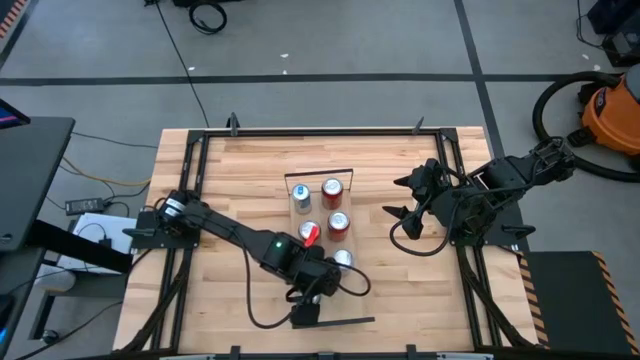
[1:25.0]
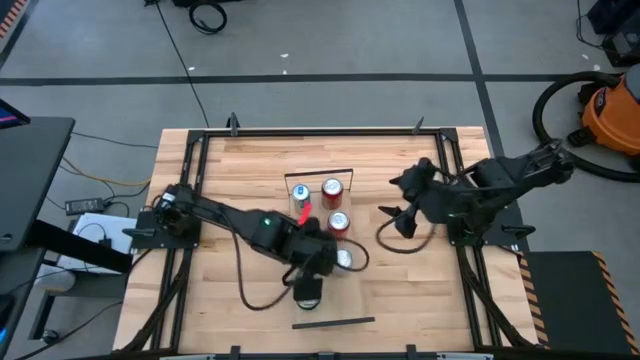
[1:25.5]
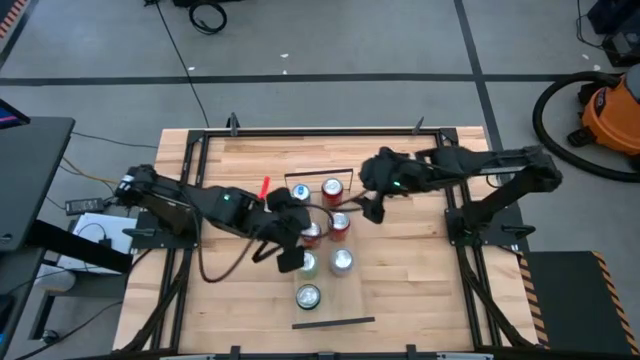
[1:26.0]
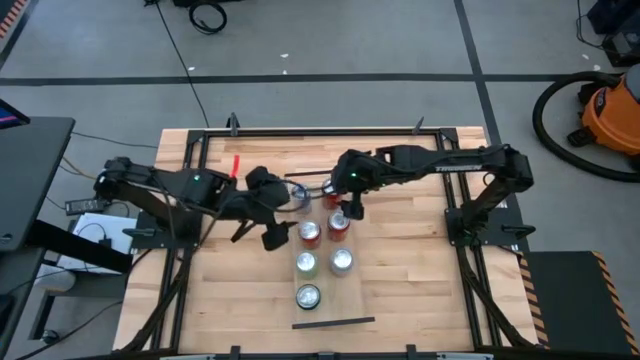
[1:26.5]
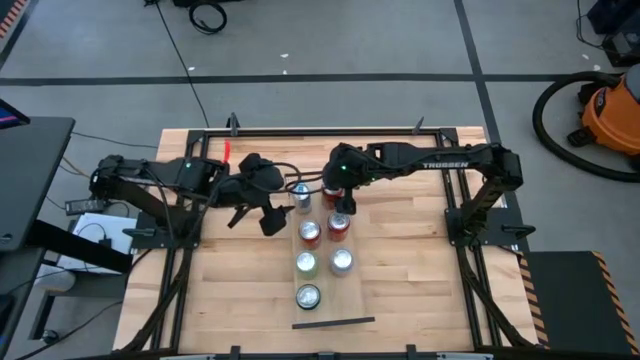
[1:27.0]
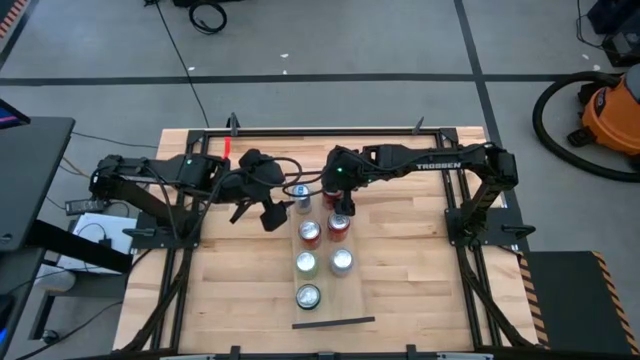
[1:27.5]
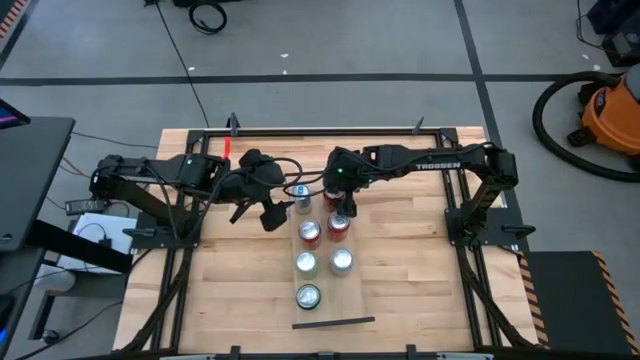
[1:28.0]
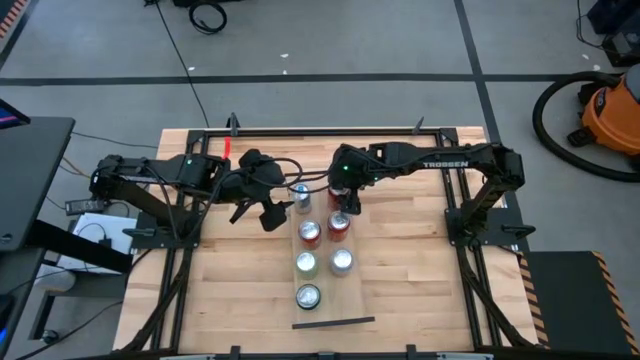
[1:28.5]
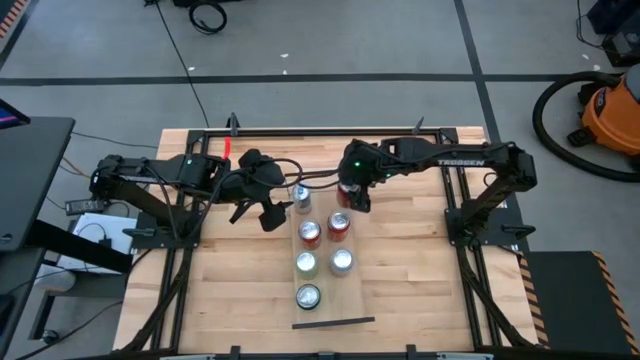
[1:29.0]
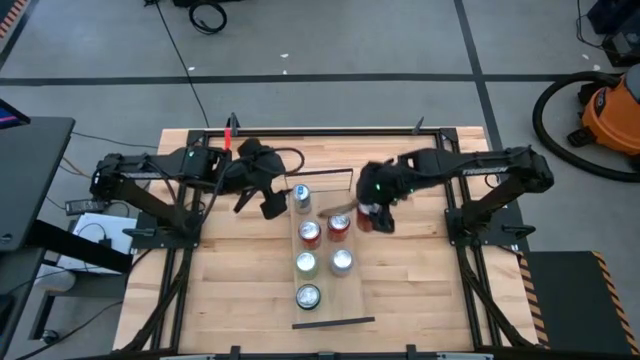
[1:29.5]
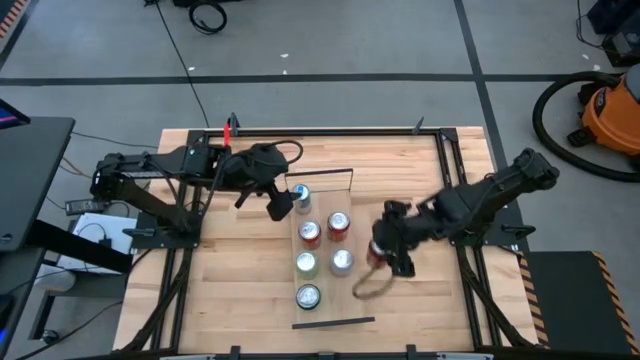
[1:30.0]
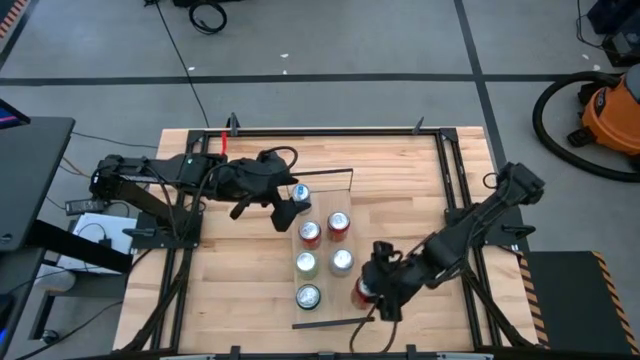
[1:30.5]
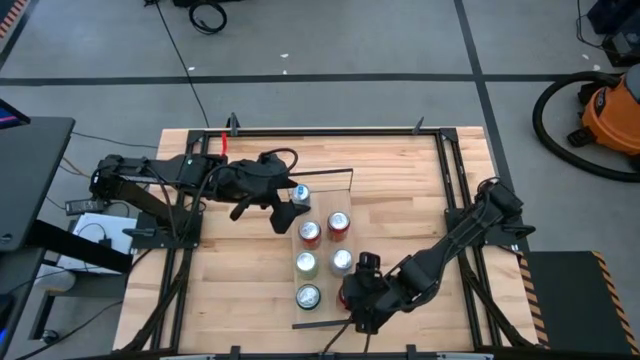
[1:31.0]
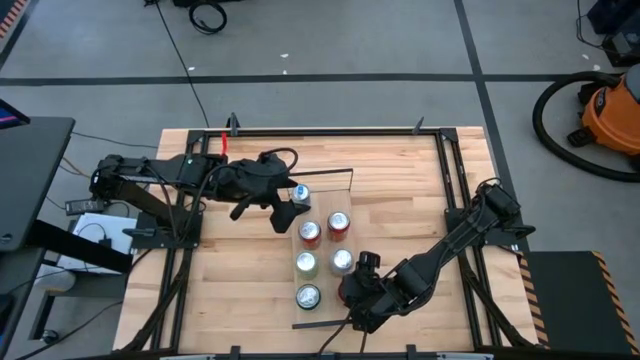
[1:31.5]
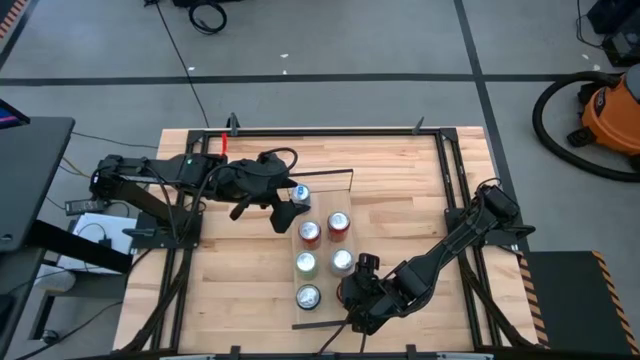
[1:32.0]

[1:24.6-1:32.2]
Task: Place canned beverage on shelf
Adjust the red and black soda can on the shelf

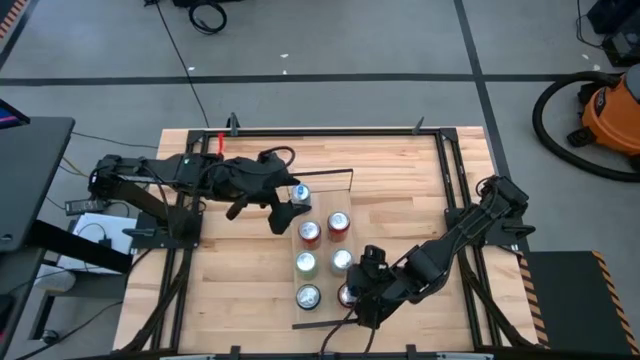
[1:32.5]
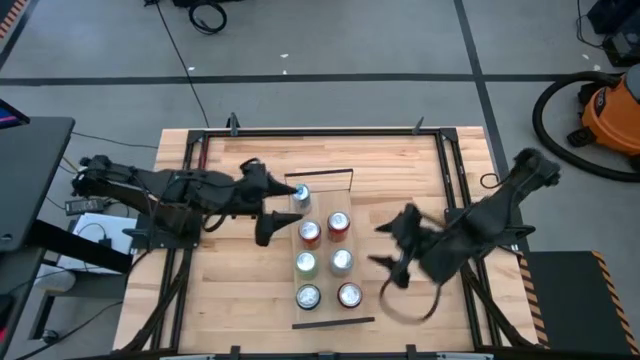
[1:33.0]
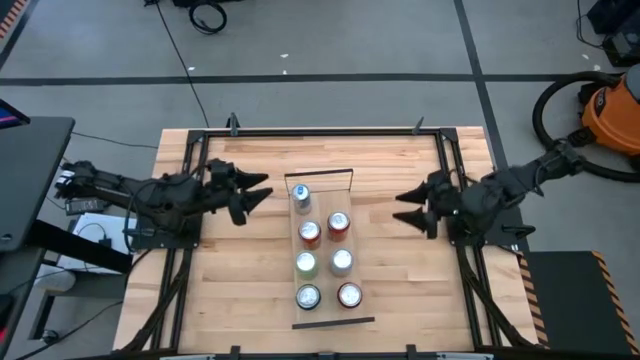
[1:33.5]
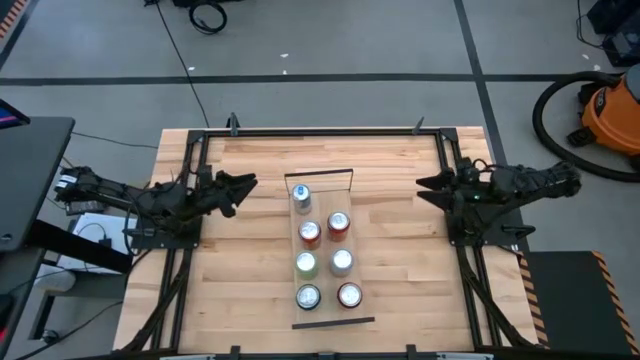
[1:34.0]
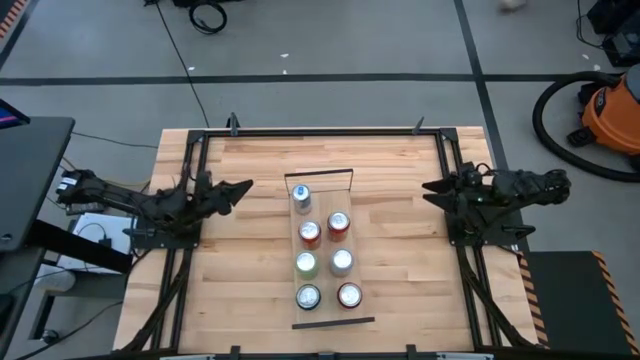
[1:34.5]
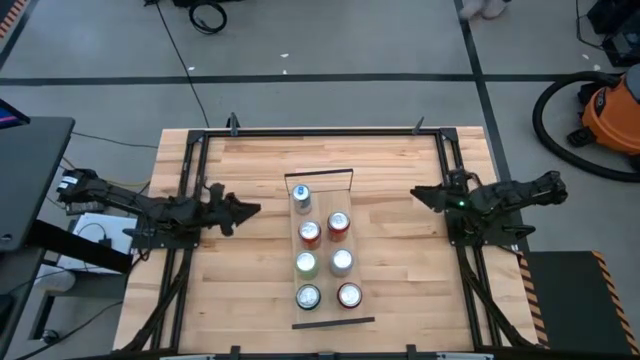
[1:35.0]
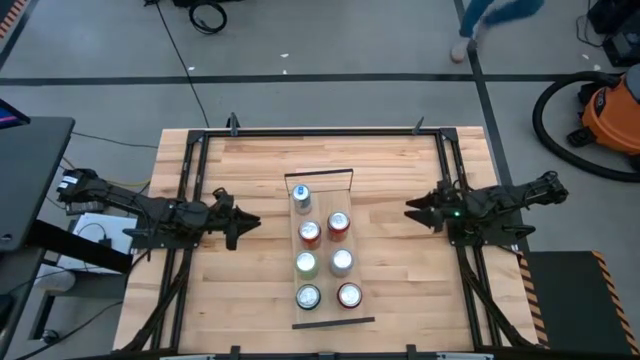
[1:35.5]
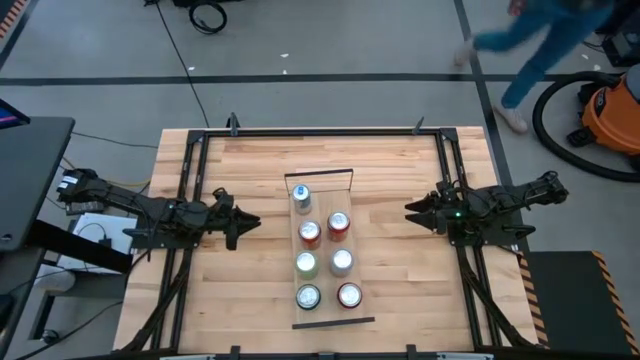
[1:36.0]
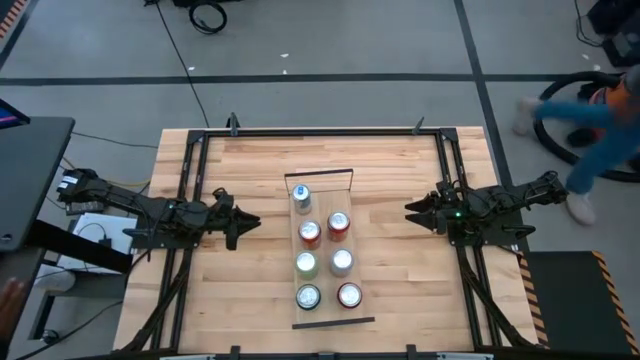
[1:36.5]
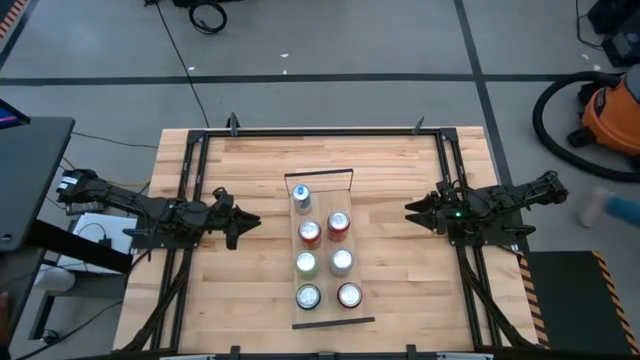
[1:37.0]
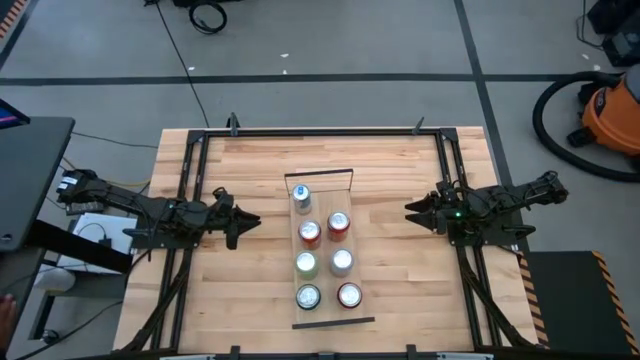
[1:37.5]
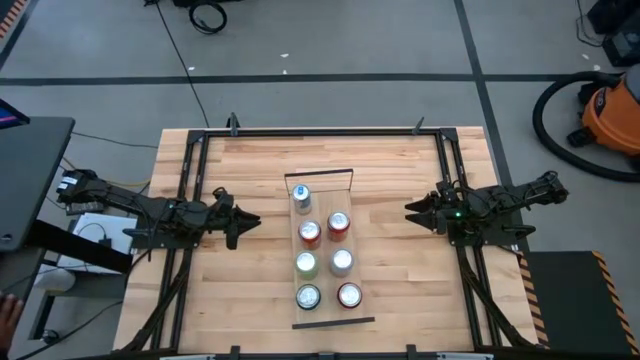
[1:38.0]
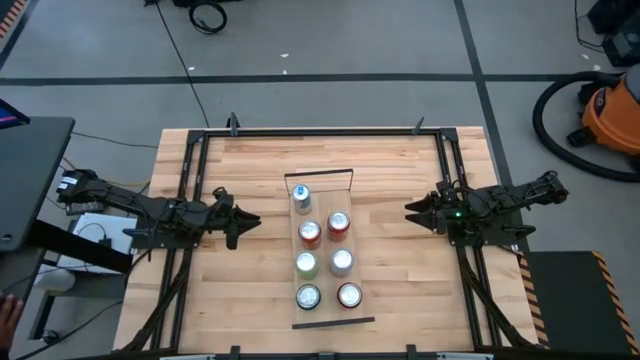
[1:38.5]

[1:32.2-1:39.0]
Return to Home Position

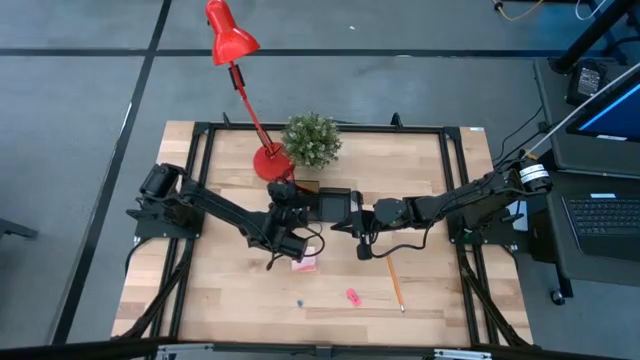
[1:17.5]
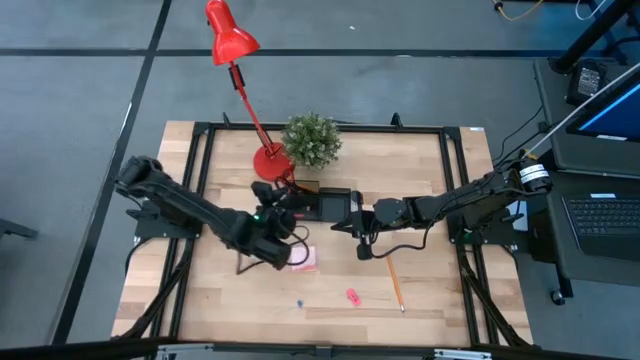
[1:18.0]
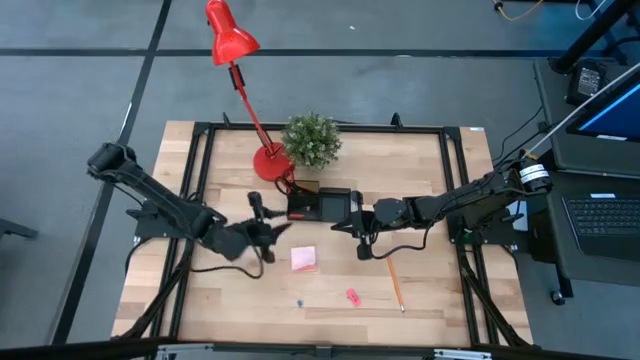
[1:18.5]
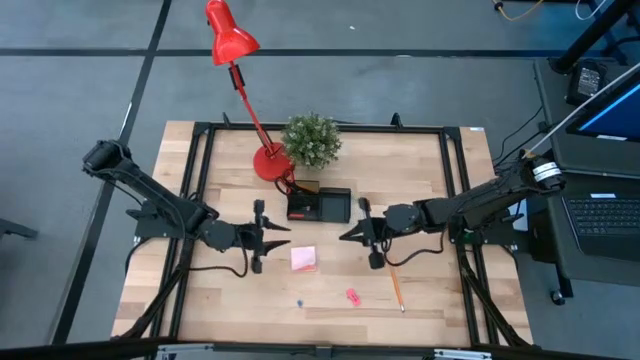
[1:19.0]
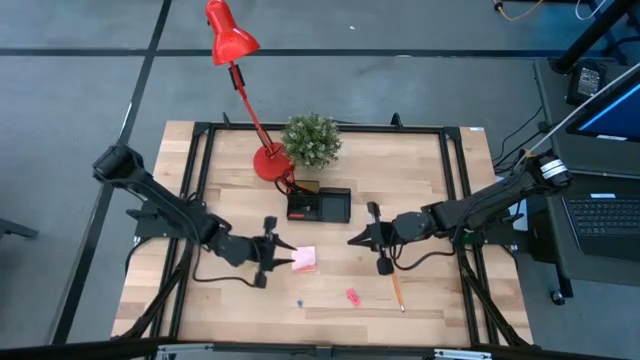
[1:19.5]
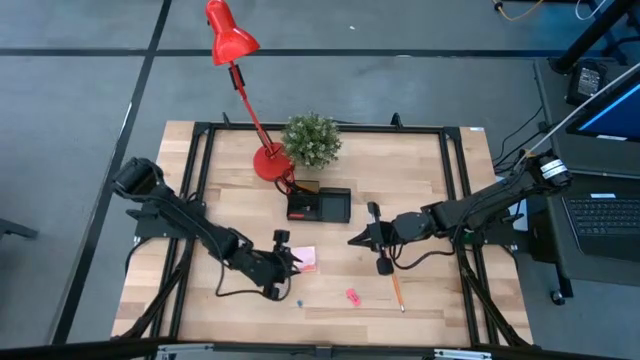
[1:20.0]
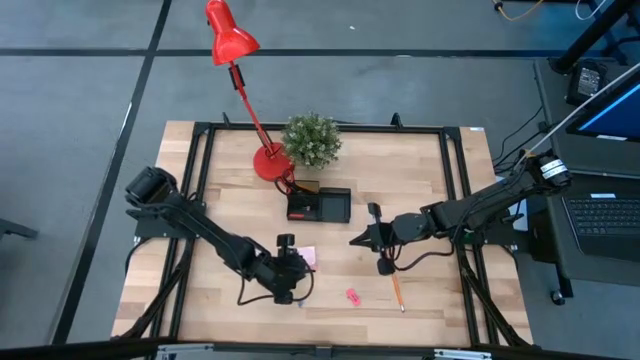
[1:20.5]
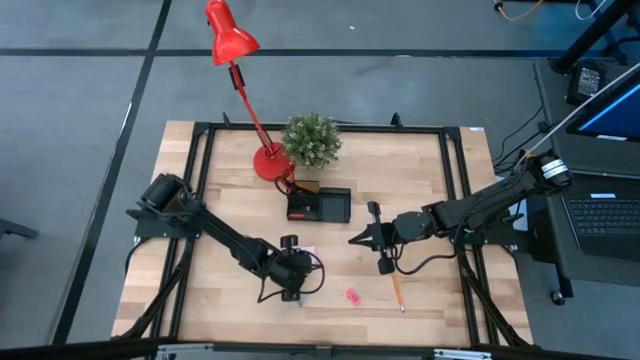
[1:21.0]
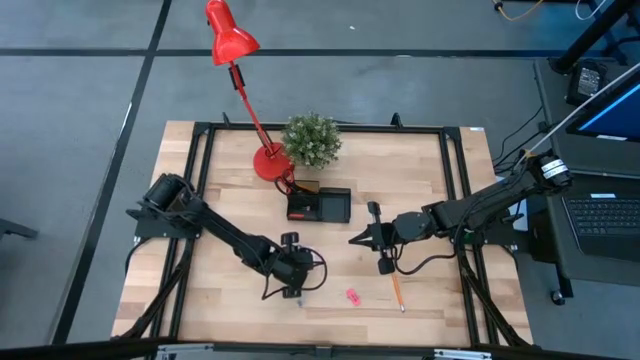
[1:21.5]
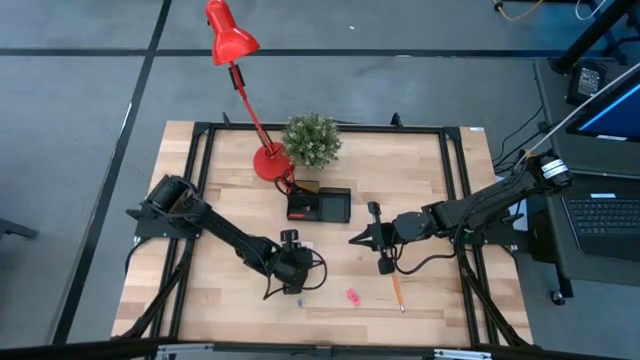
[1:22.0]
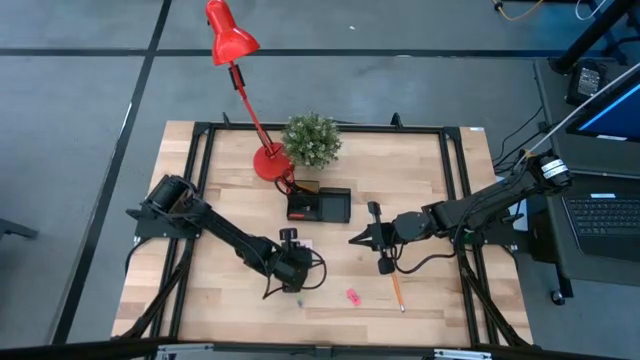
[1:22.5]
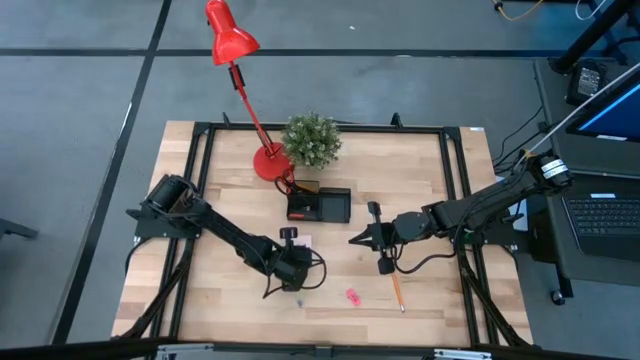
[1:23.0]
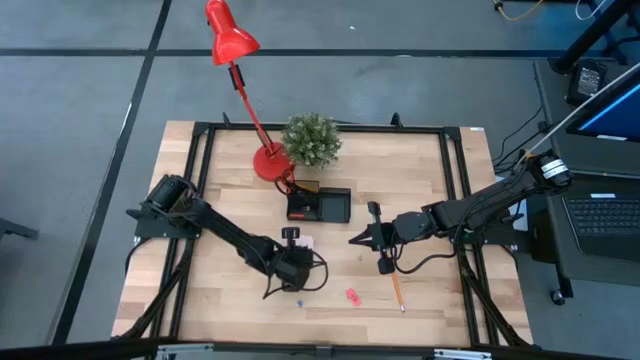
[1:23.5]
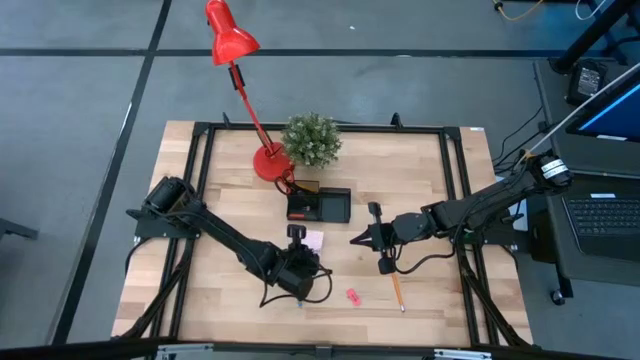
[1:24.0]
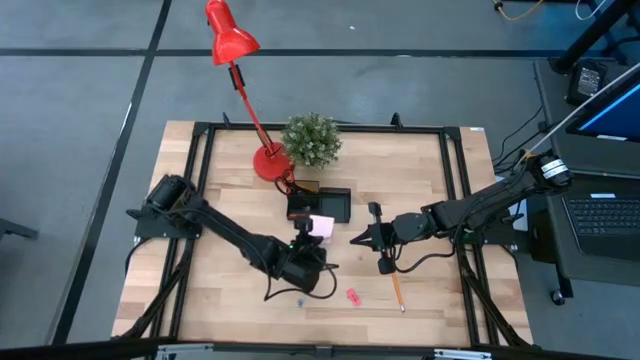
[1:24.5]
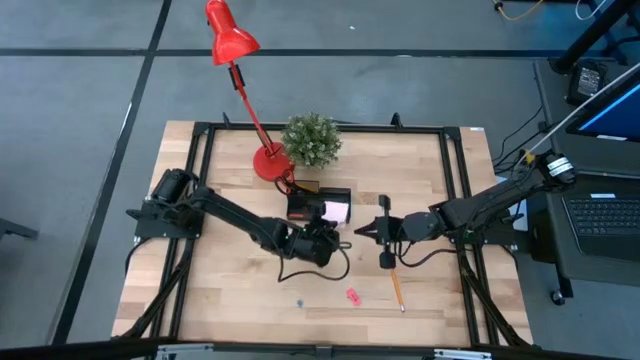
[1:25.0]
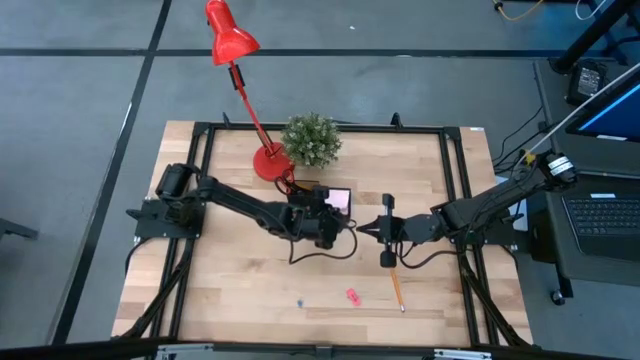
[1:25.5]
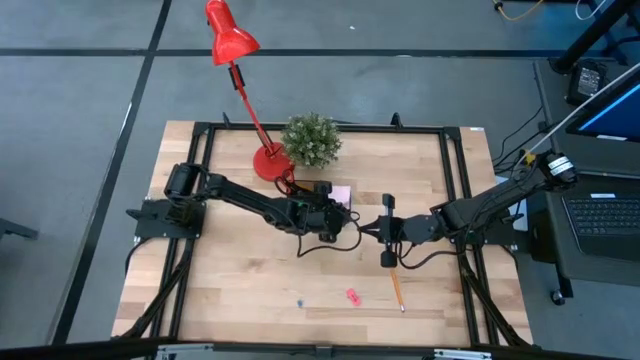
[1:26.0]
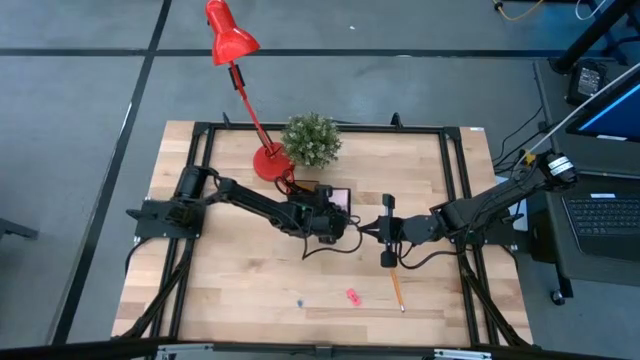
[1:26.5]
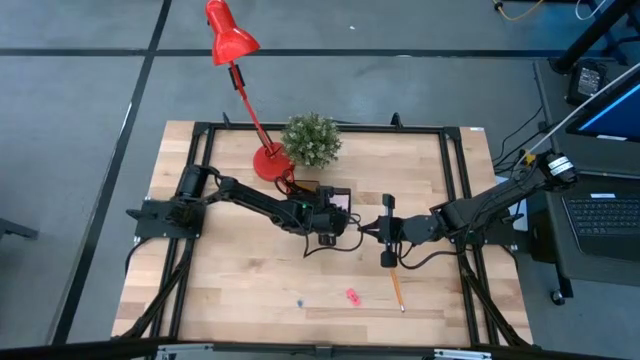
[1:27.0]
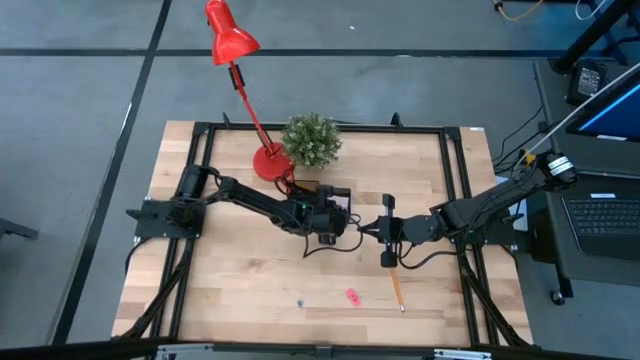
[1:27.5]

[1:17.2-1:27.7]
Task: Pick and place office supplies into organizer
Put the pink notepad into the black desk organizer
